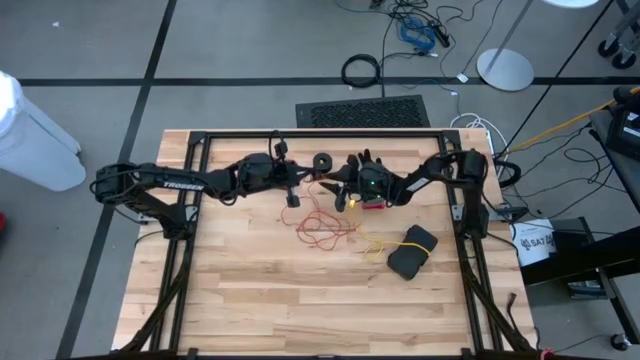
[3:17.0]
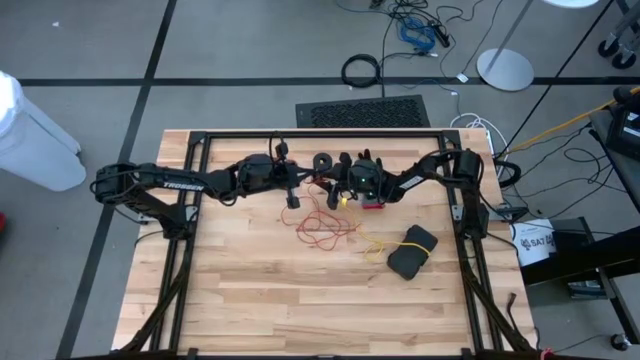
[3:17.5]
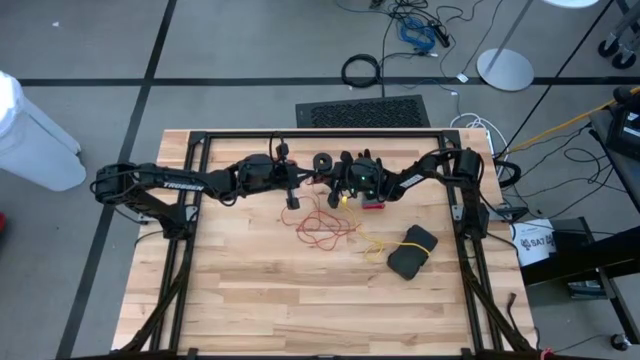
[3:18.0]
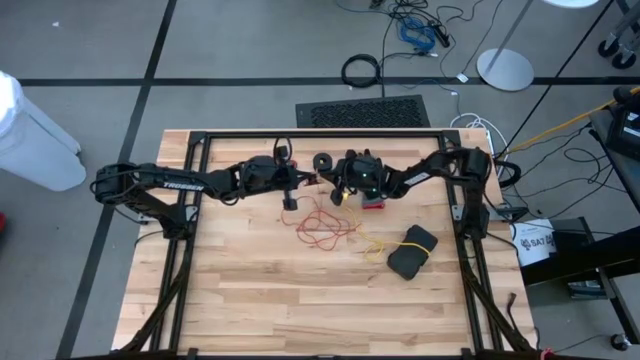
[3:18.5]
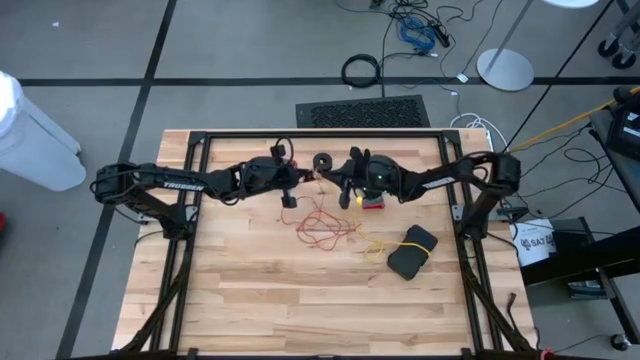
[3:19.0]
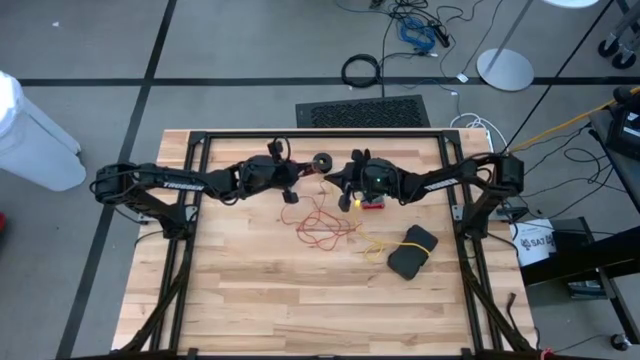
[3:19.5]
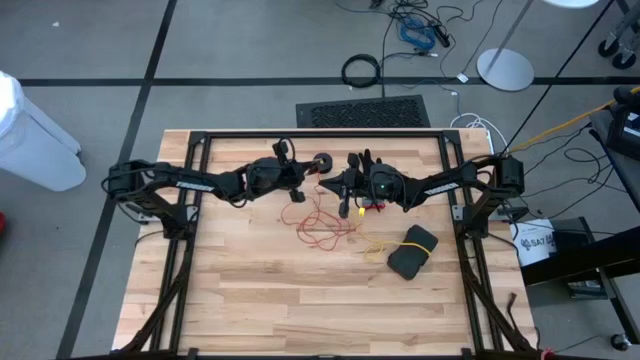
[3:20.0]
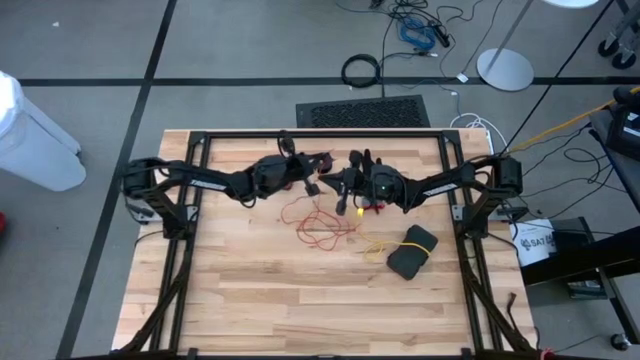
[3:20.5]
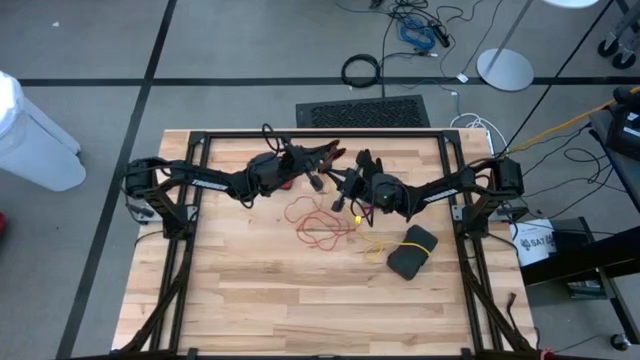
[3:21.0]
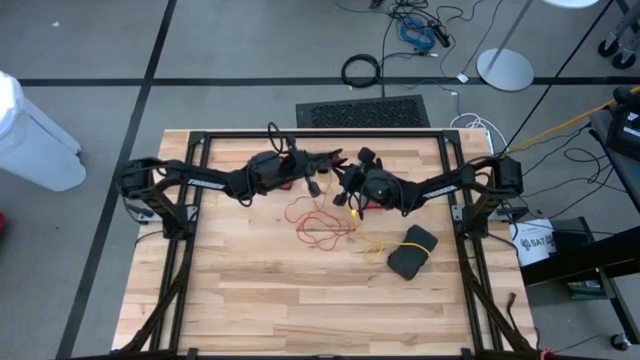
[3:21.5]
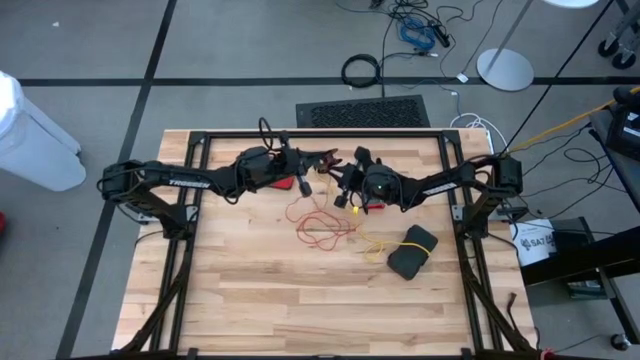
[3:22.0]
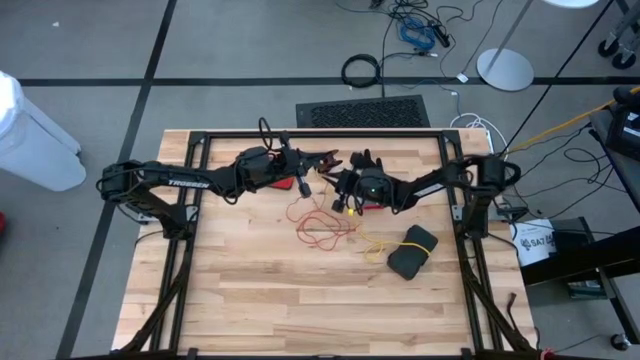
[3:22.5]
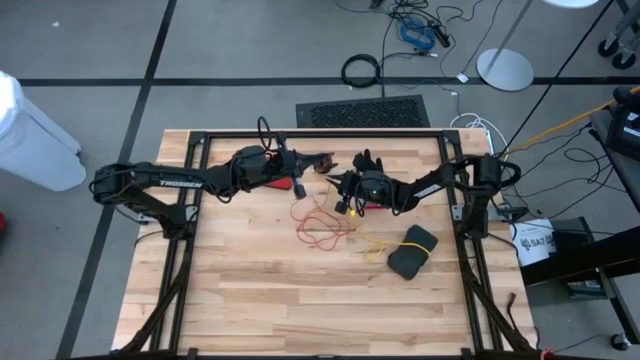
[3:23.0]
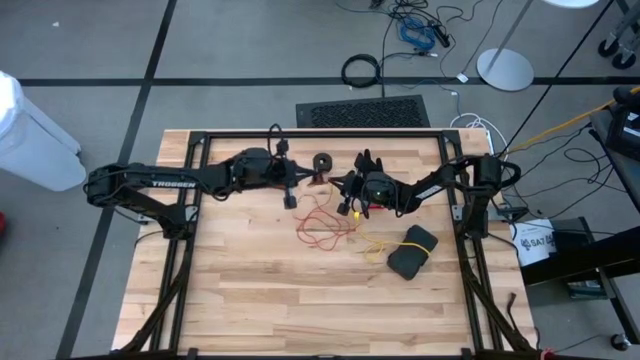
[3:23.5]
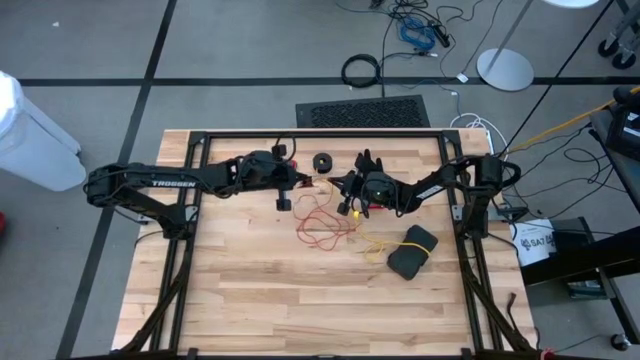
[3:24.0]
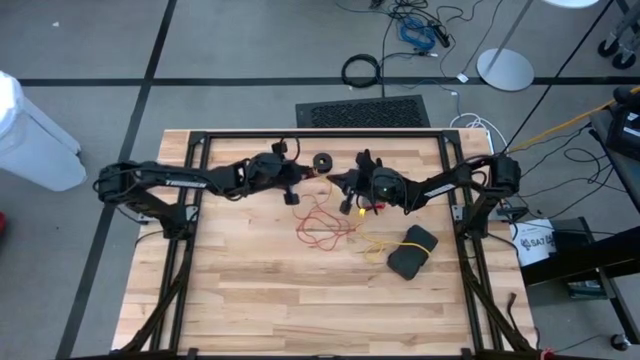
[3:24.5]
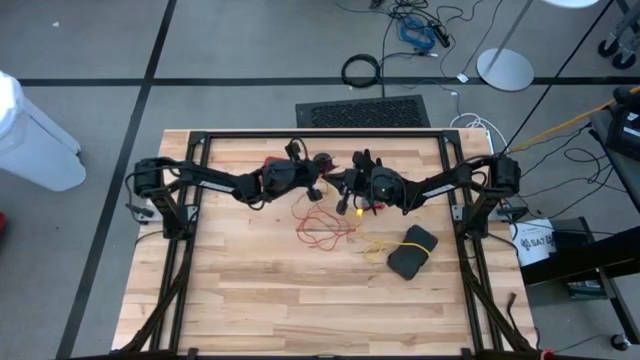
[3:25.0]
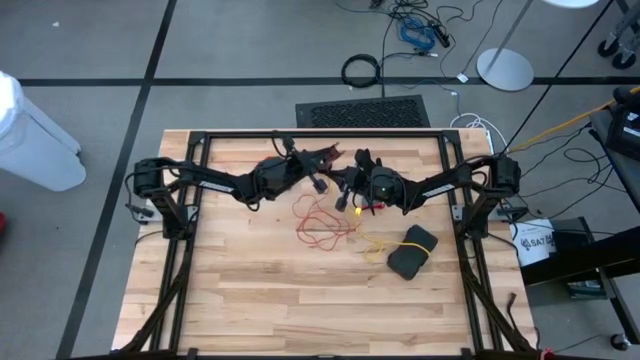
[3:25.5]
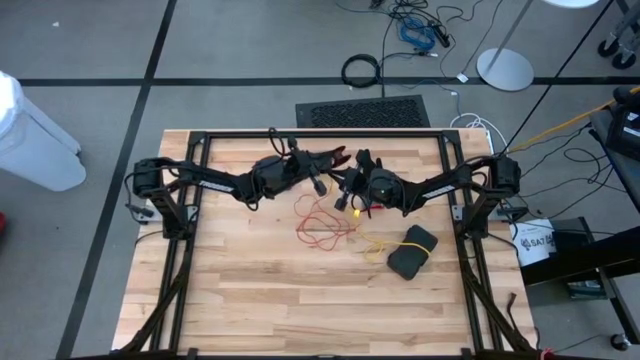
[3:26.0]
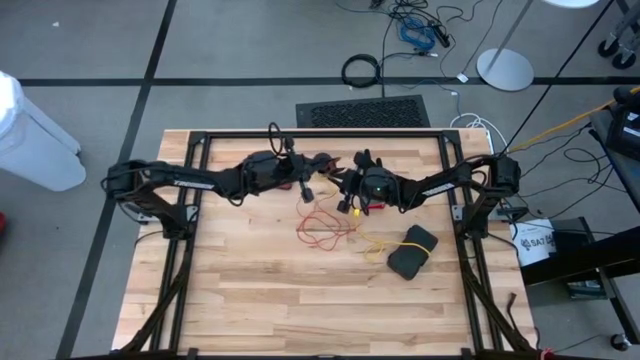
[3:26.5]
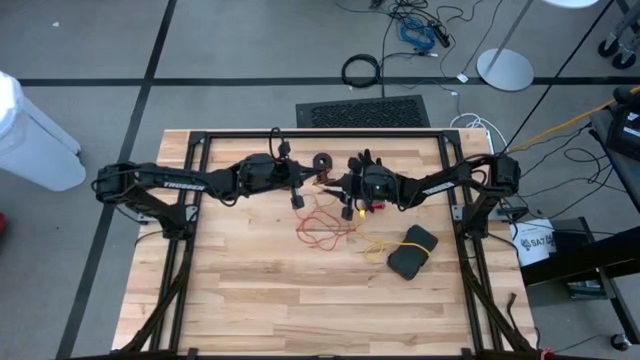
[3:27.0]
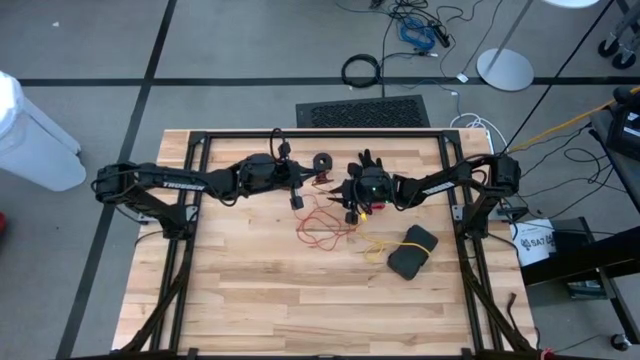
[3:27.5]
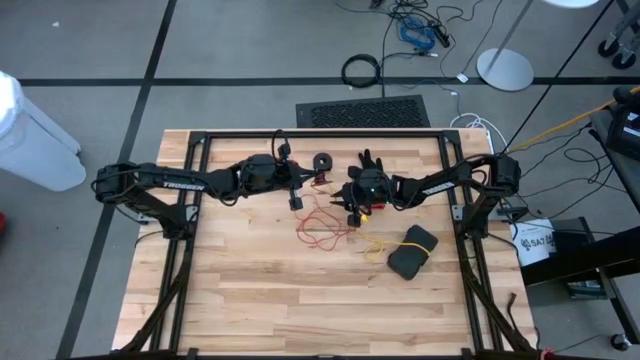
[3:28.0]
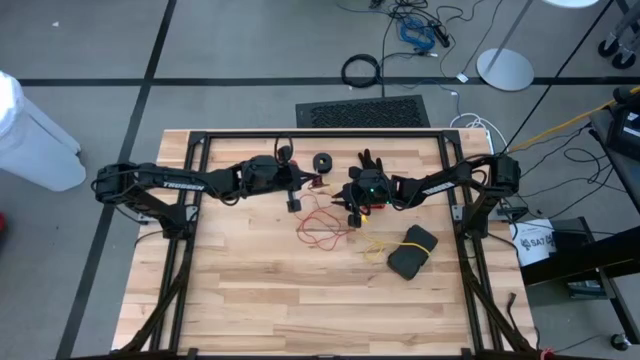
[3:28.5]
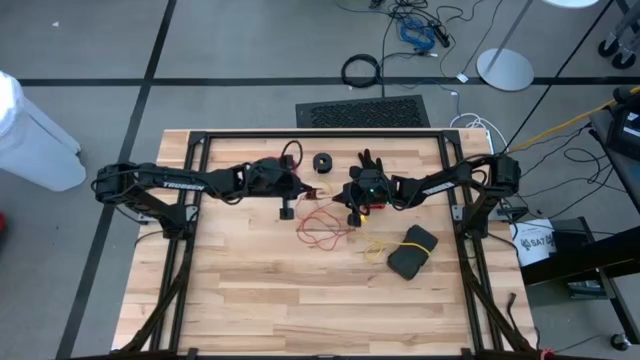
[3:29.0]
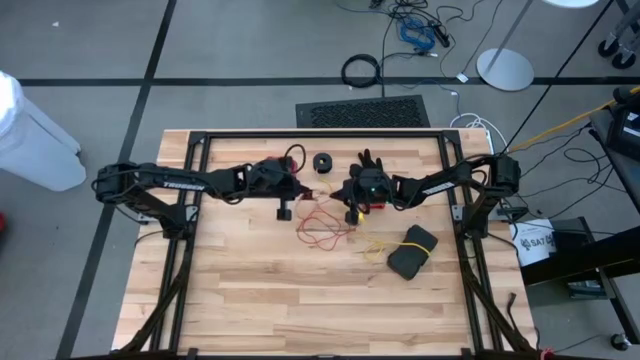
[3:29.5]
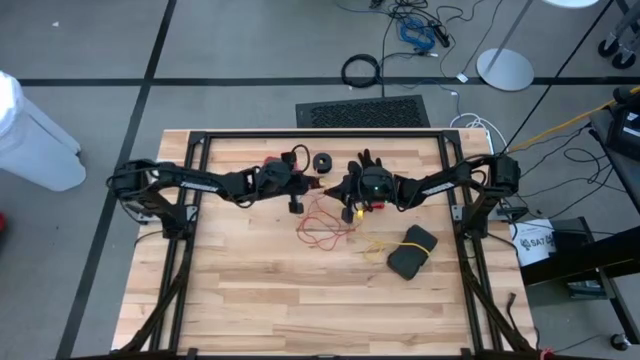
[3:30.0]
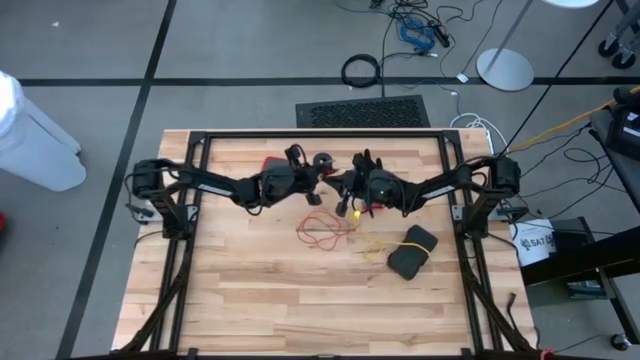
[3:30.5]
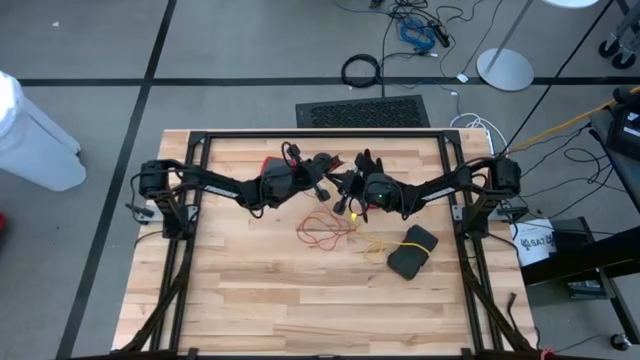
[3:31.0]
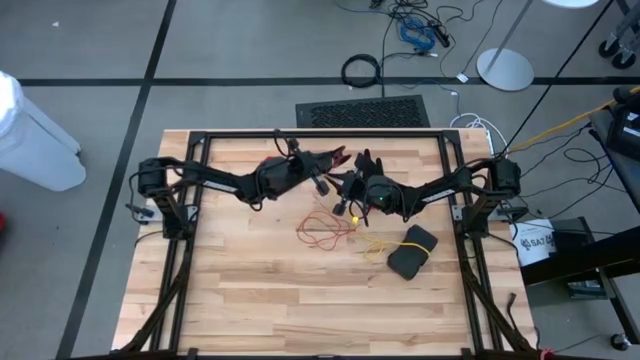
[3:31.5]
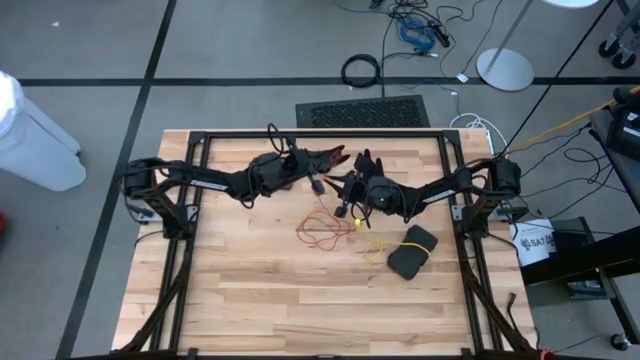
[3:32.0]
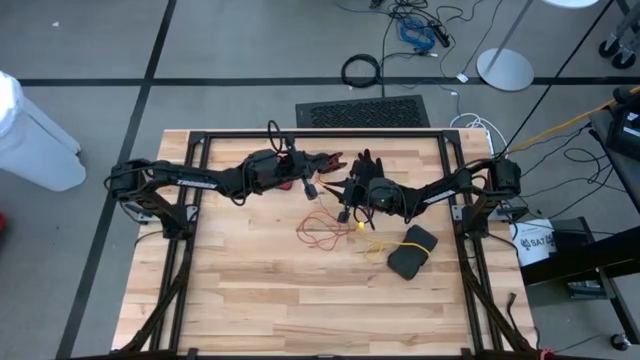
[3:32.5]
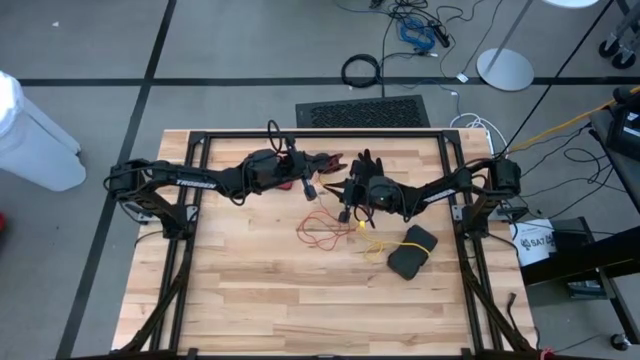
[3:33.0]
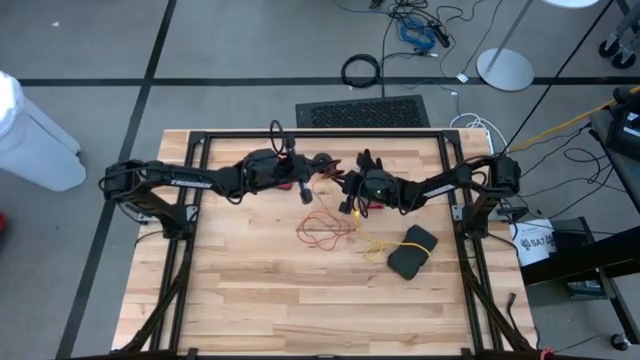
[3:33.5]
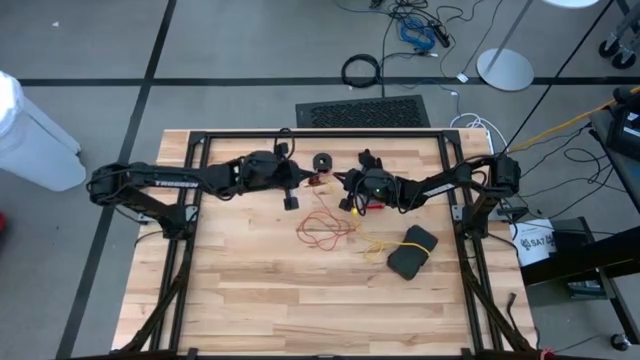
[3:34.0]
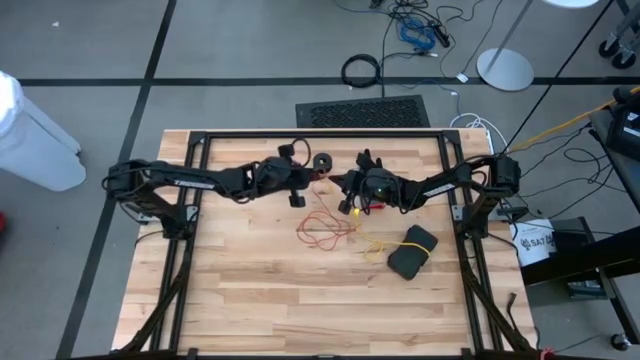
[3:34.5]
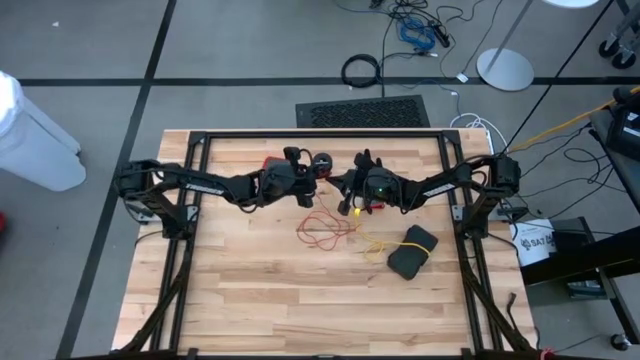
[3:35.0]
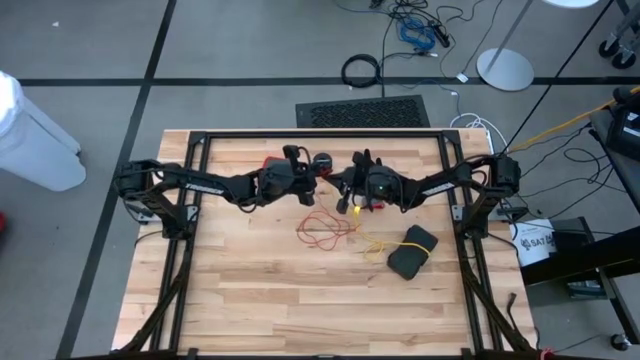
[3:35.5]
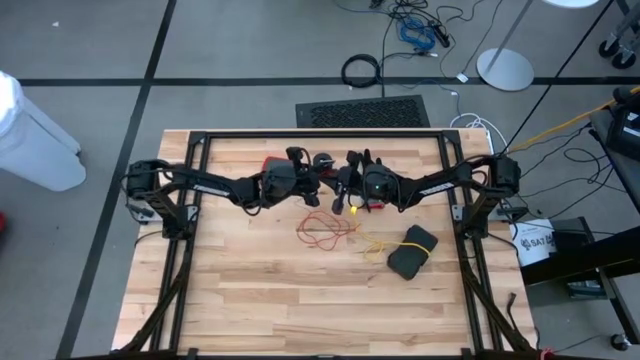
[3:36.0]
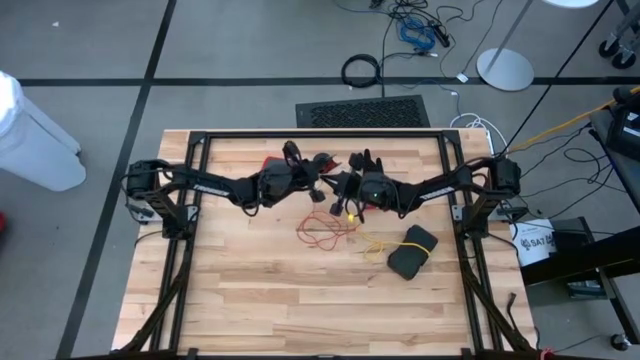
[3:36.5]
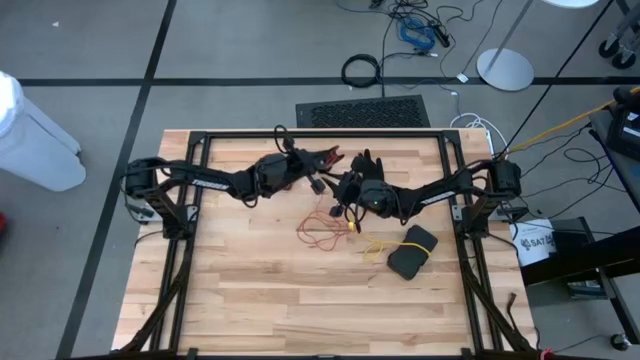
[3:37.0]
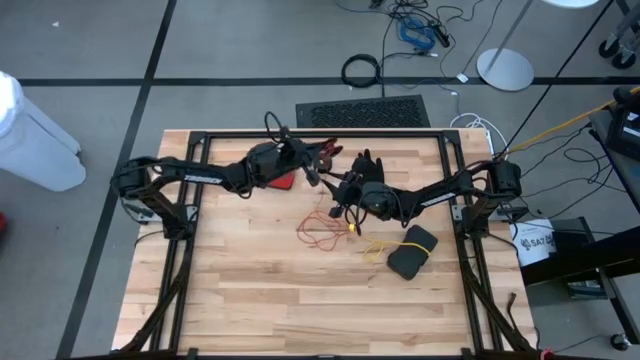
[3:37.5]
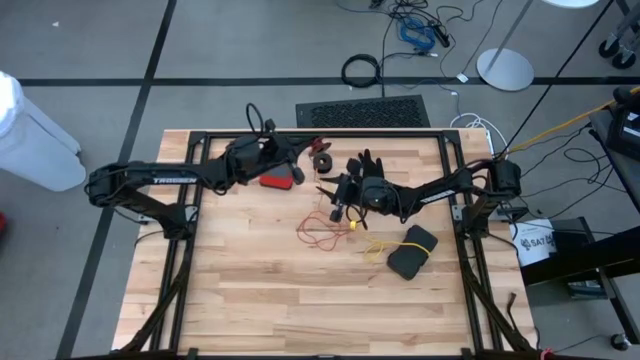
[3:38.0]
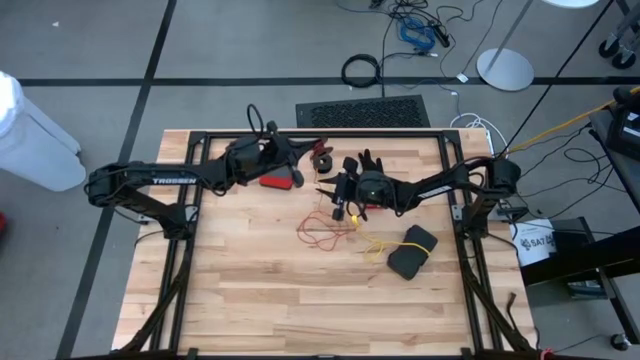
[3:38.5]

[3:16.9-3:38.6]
Task: Coil cords
Coil the red wire onto spool
